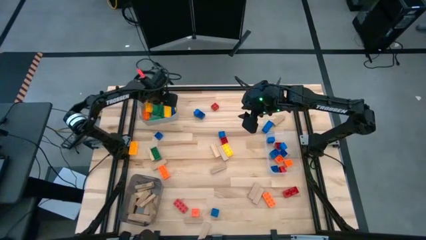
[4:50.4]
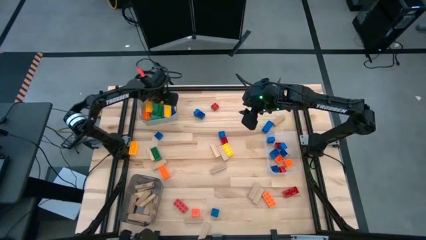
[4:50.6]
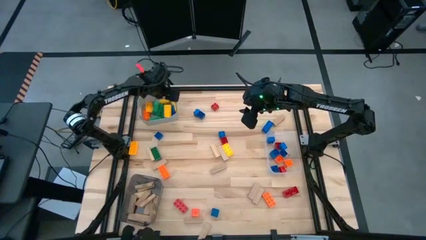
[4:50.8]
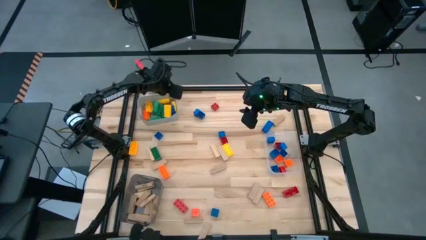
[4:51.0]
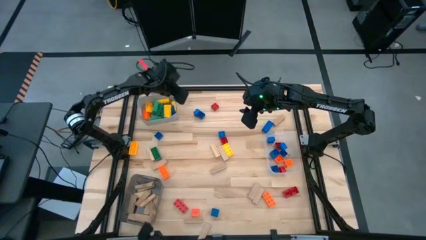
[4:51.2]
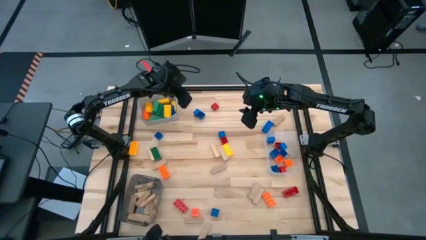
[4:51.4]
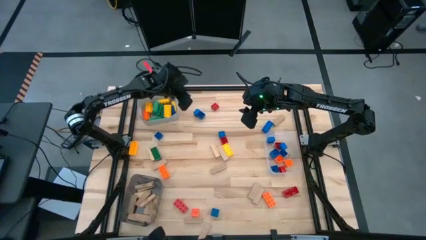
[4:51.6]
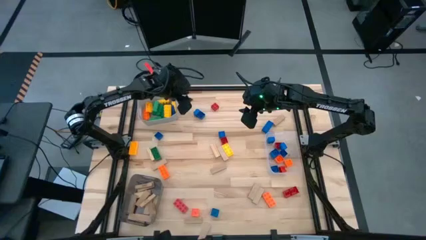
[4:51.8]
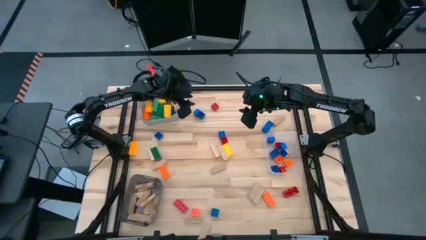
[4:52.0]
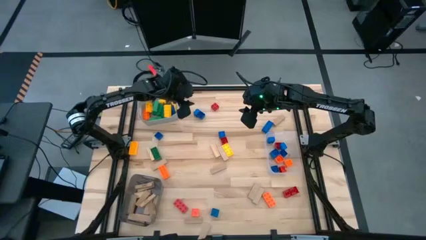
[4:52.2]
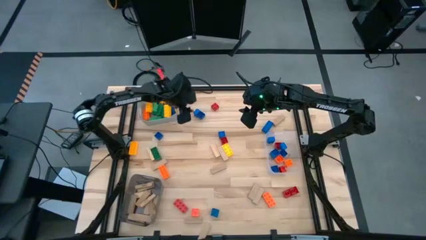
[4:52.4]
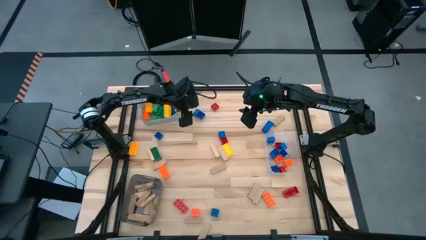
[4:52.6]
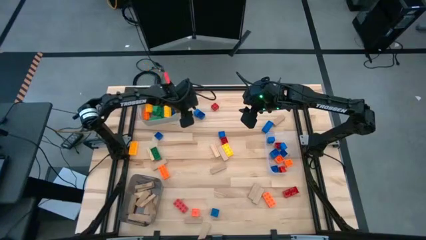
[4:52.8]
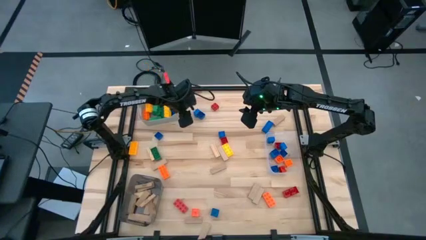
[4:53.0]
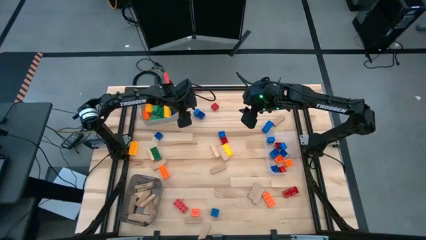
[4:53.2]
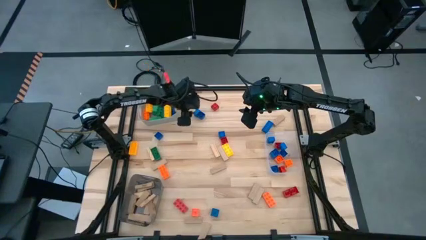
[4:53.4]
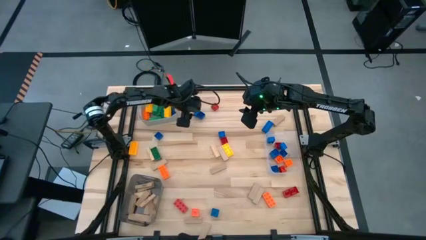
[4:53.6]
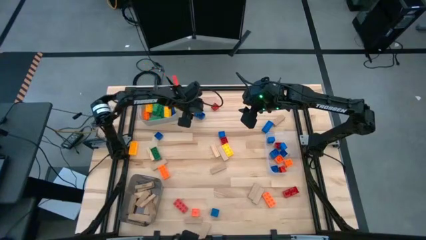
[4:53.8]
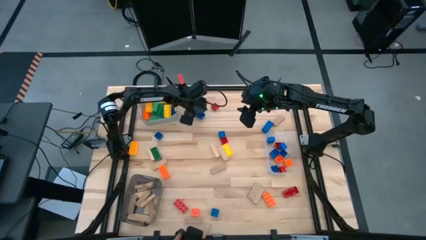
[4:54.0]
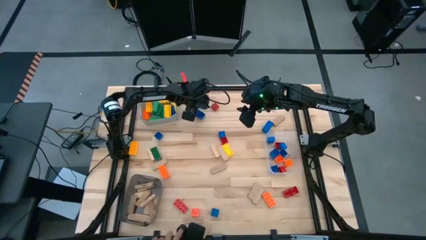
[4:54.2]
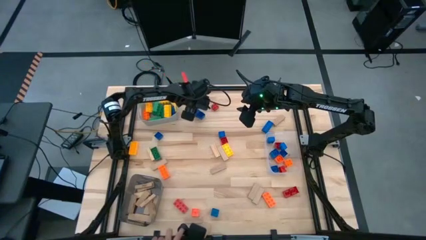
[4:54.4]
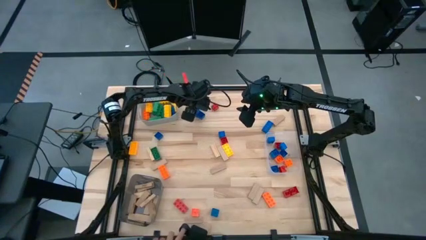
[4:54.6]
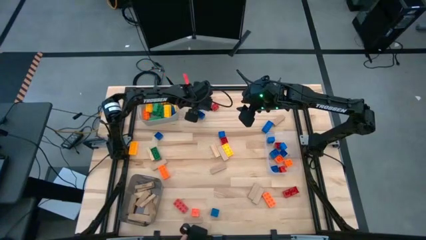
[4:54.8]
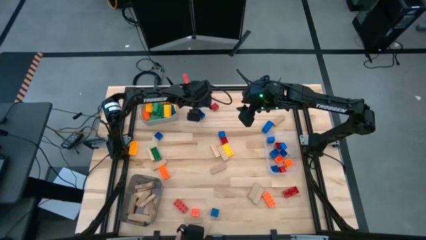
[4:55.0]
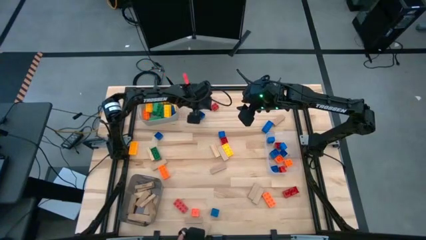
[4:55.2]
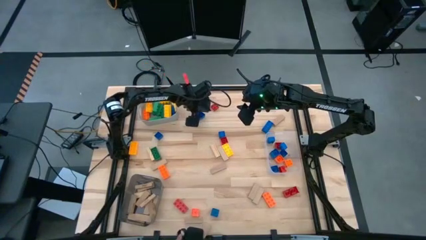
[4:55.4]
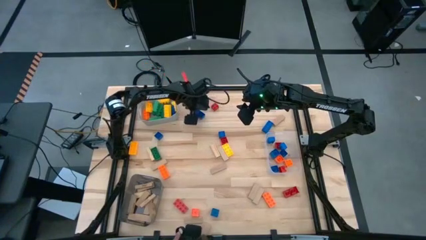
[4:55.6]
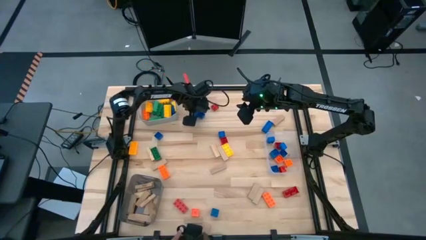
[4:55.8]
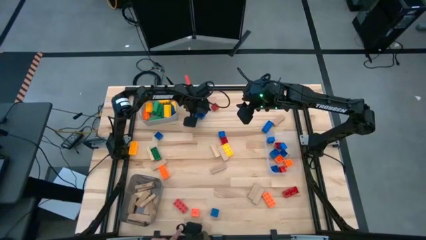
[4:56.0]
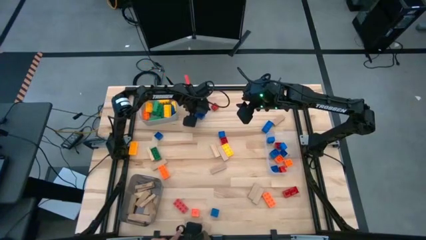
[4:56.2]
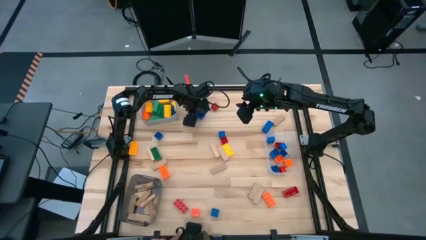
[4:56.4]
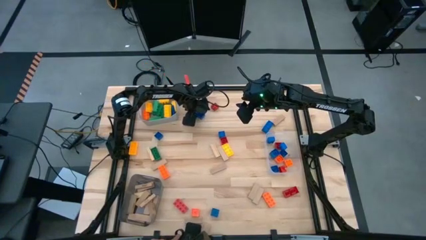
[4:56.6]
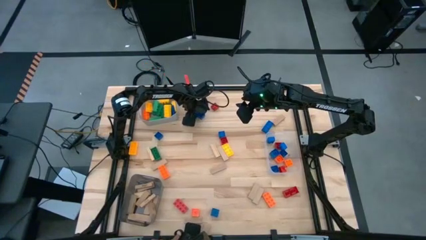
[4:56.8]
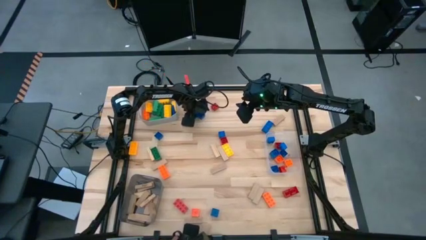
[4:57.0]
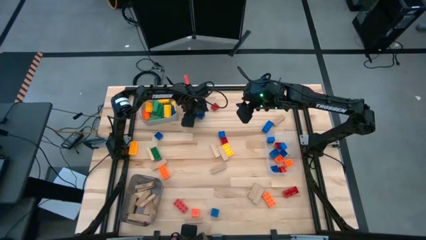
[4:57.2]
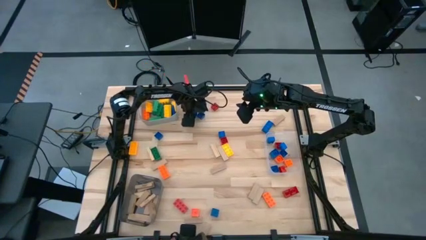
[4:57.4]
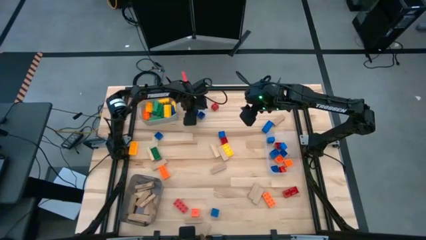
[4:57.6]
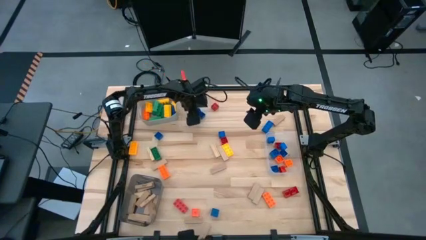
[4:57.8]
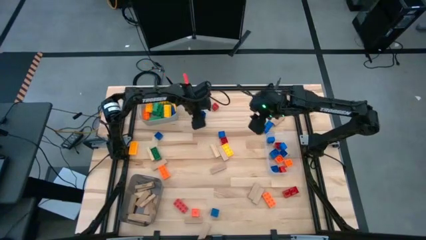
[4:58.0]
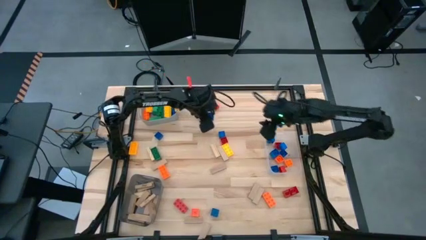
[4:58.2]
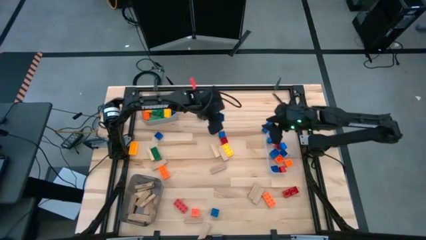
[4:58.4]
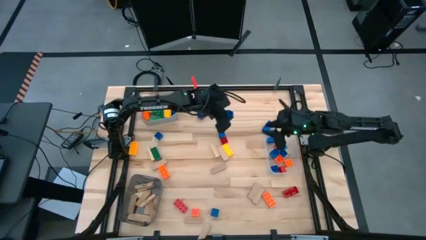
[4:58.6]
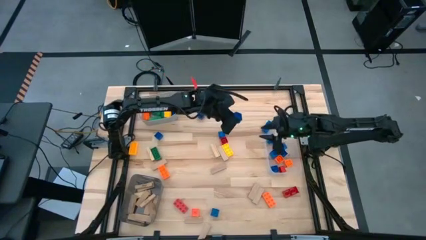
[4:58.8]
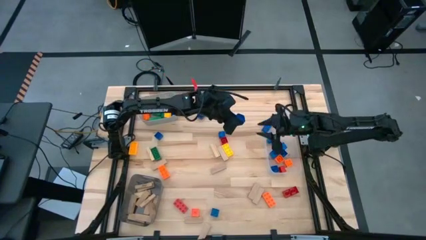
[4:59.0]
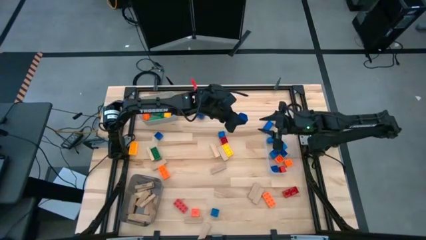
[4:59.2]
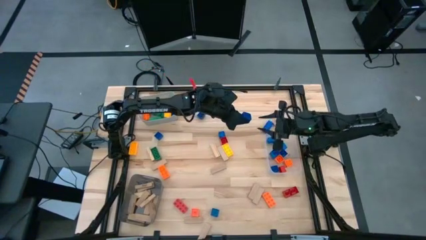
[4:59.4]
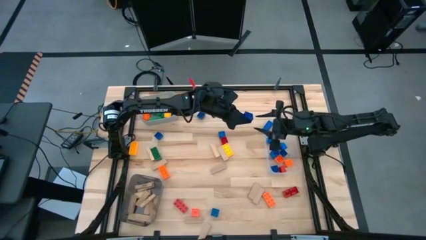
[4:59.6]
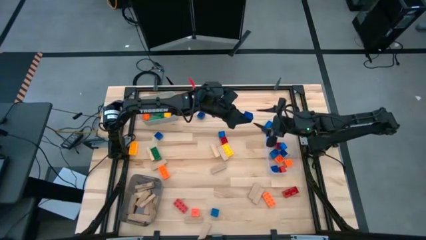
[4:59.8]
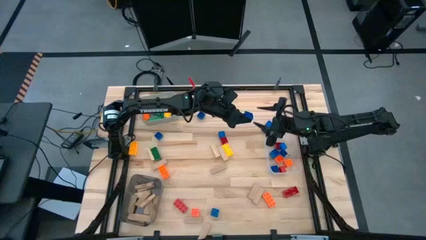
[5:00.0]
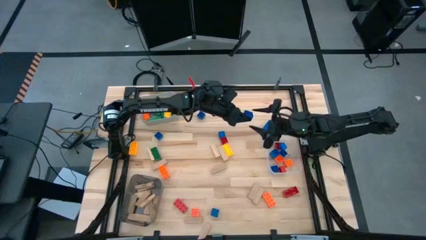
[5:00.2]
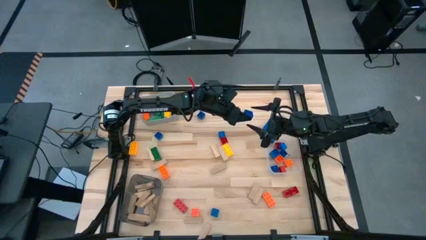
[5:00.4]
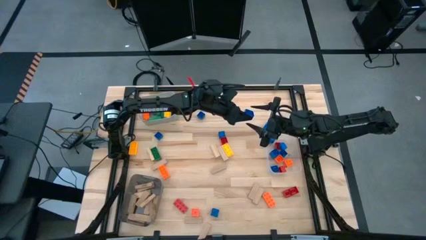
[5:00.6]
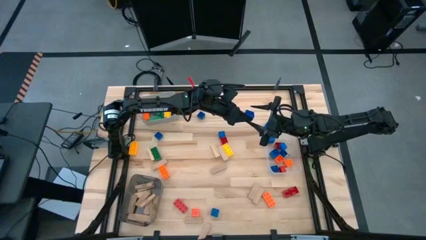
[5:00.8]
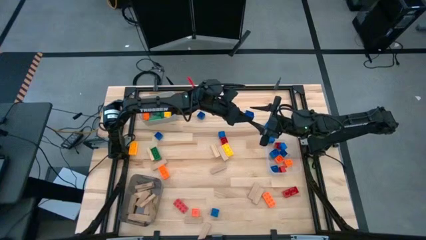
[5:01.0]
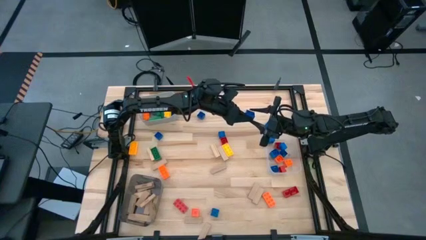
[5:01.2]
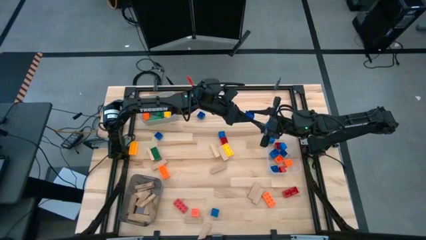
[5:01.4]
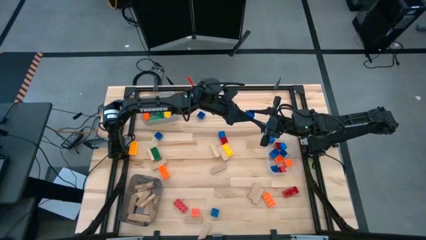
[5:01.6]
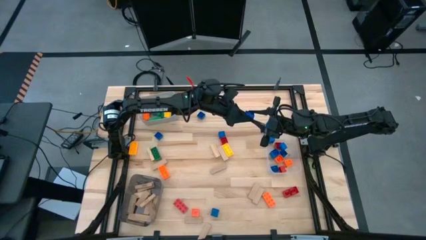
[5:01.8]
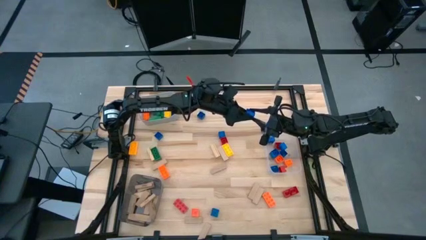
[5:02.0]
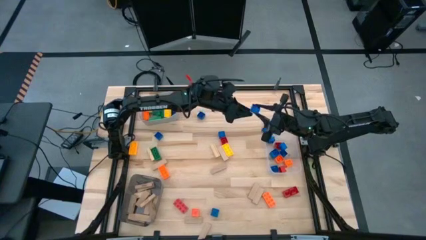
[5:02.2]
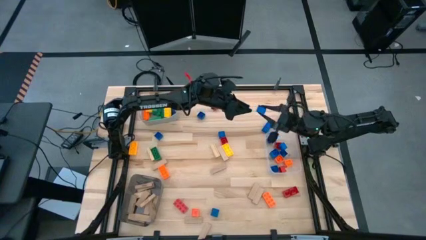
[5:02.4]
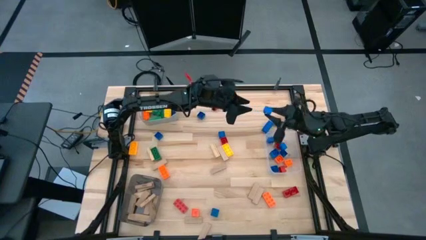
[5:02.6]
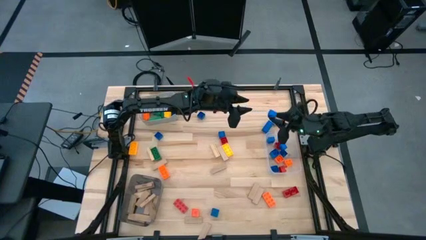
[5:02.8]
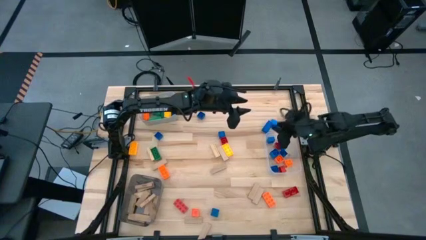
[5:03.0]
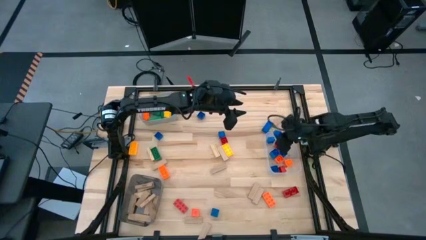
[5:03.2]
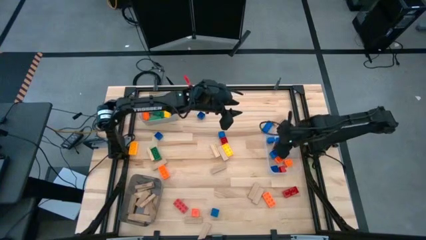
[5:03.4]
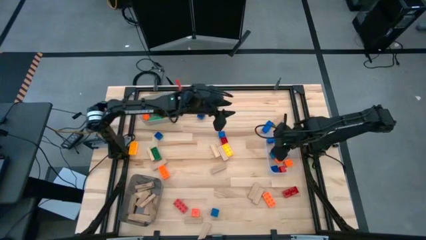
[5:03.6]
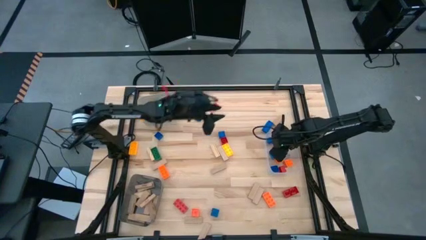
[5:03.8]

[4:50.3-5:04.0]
Task: Sort blocks by size
Put the small blue game piece into the transparent bin

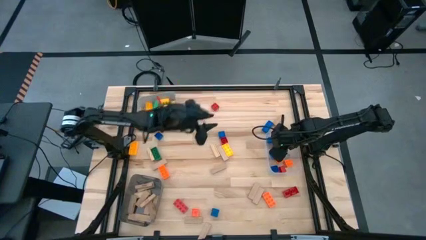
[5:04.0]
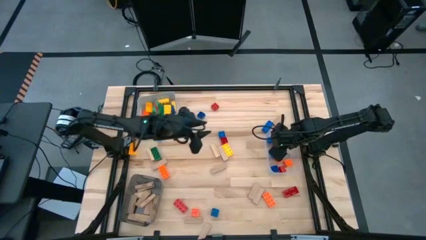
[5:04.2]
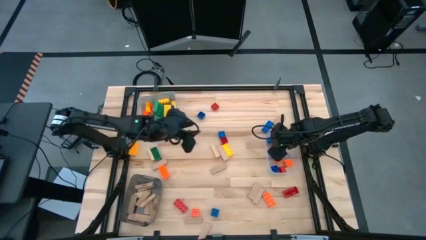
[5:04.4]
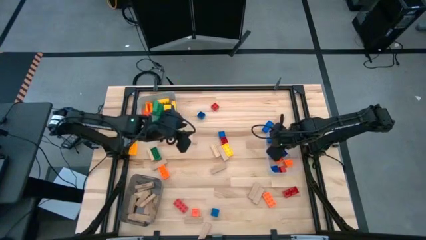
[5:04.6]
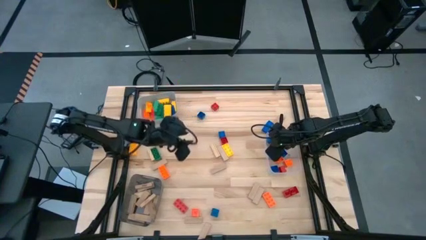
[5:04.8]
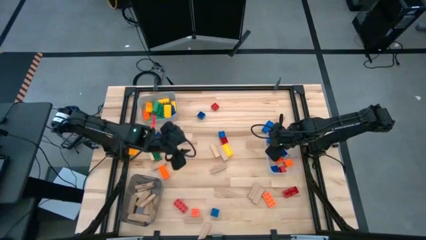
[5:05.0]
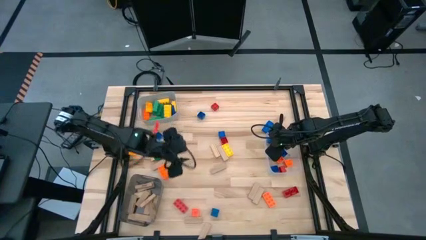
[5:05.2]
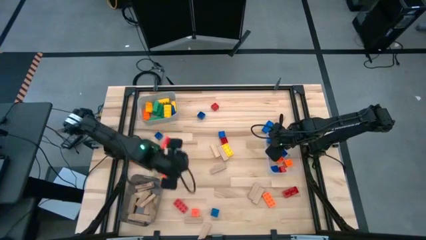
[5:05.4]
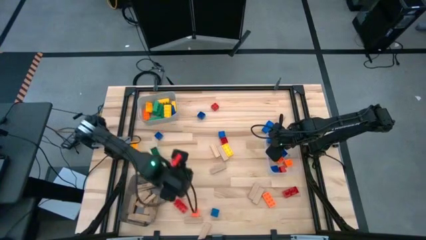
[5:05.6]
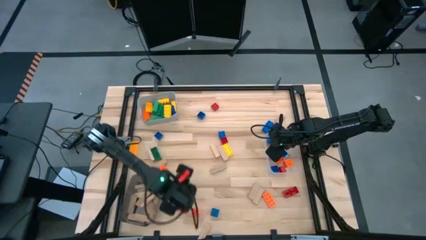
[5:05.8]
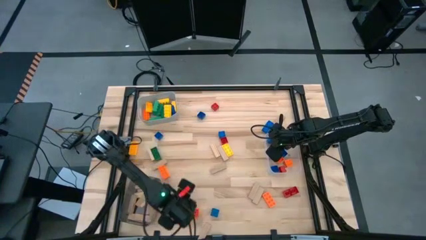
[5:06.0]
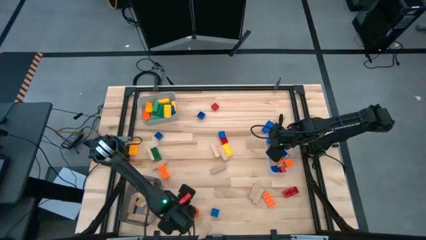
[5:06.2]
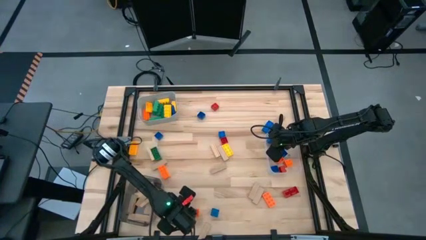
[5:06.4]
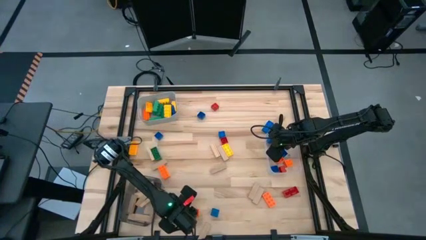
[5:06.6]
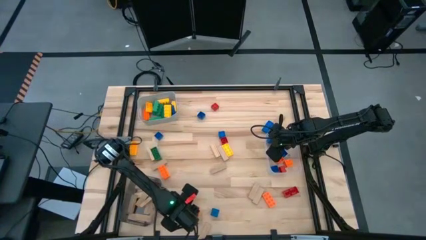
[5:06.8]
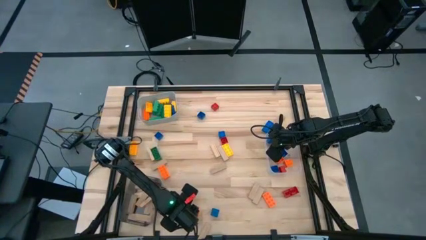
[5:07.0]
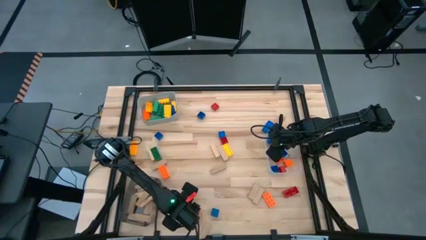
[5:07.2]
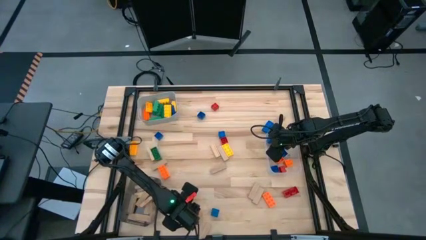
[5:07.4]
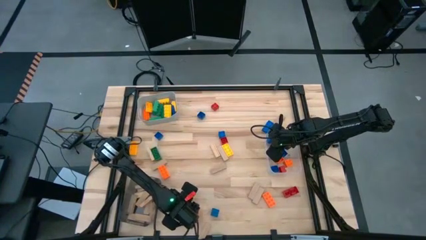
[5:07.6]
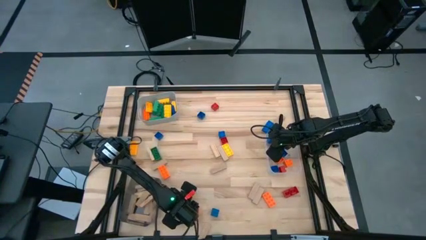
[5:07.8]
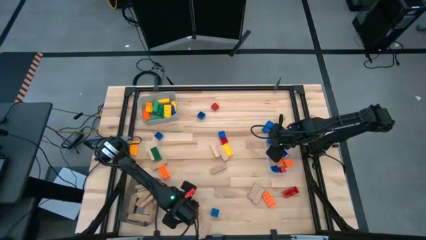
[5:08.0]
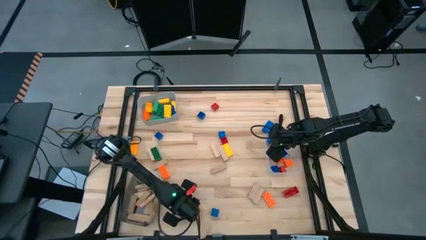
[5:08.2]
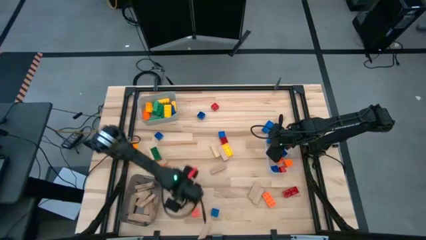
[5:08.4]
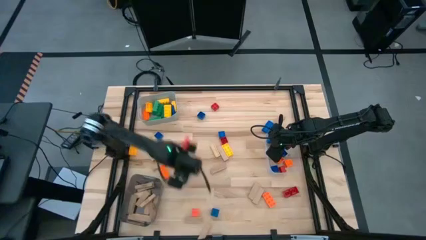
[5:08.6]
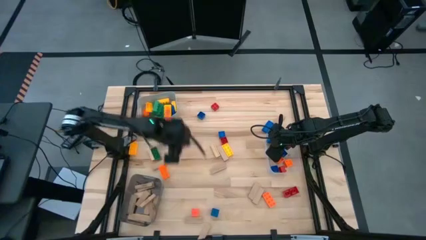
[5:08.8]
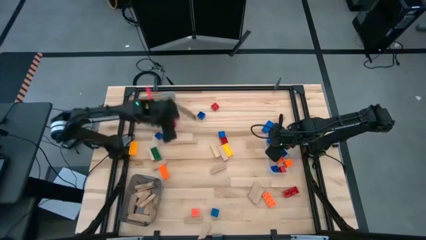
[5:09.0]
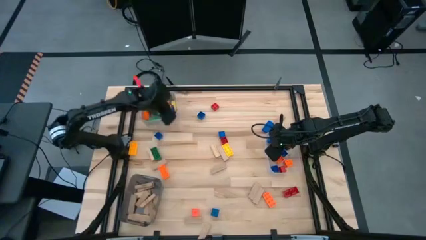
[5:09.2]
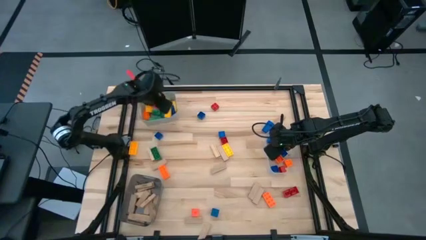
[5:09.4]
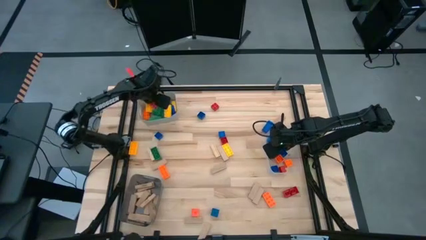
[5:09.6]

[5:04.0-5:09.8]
Put the large red game piece into the gray bin
